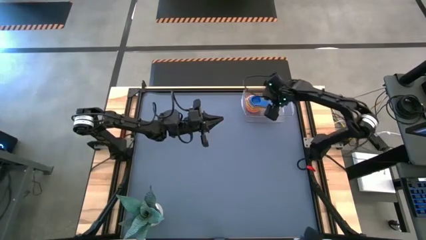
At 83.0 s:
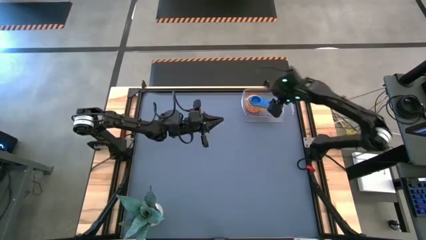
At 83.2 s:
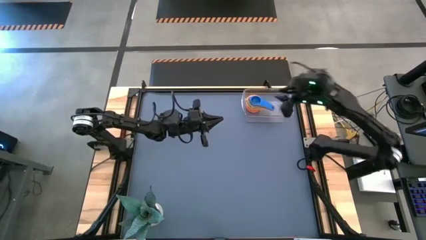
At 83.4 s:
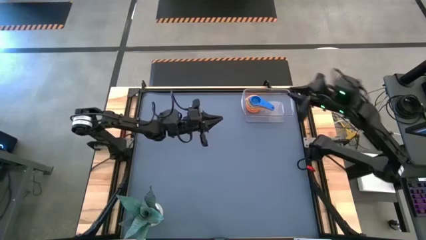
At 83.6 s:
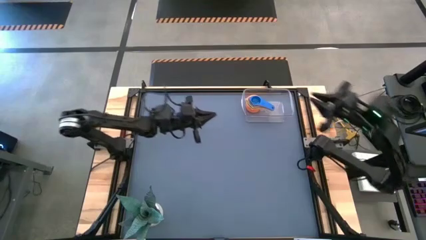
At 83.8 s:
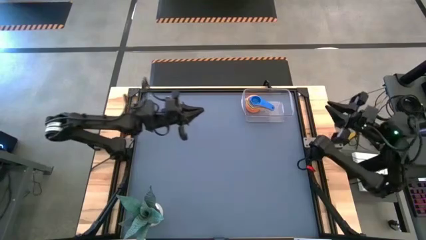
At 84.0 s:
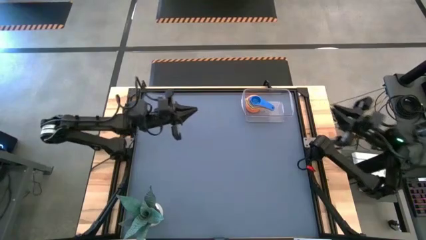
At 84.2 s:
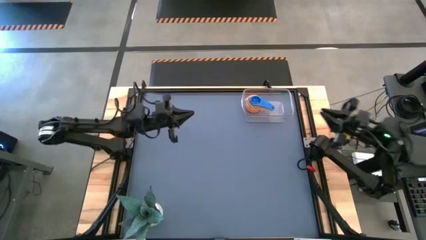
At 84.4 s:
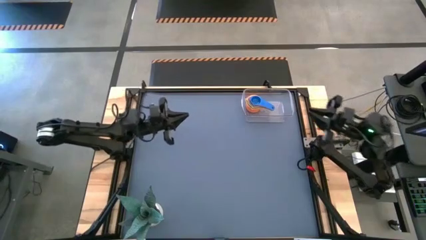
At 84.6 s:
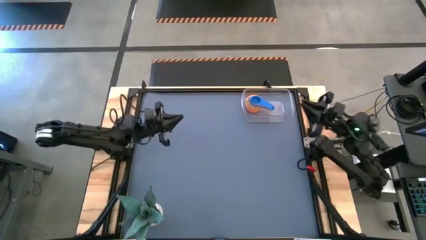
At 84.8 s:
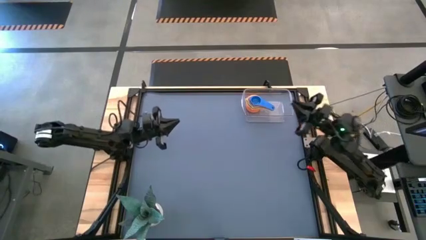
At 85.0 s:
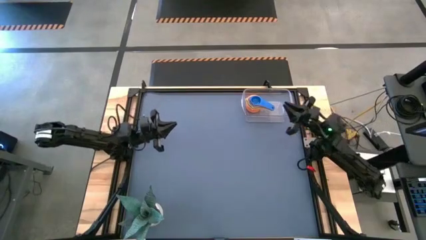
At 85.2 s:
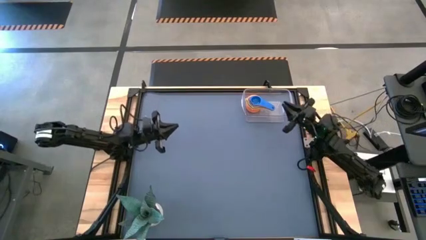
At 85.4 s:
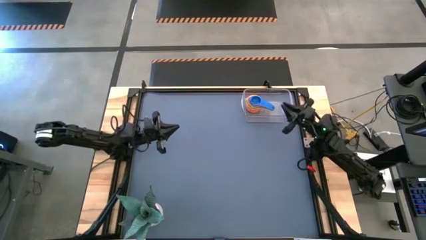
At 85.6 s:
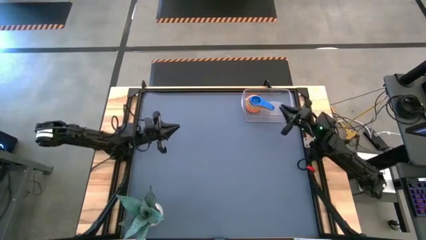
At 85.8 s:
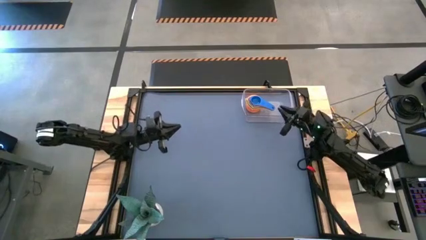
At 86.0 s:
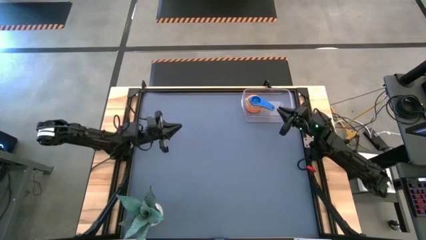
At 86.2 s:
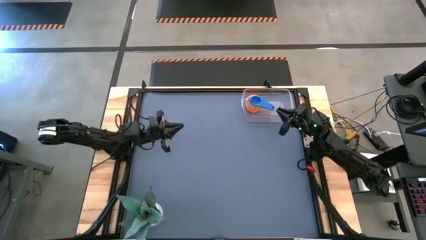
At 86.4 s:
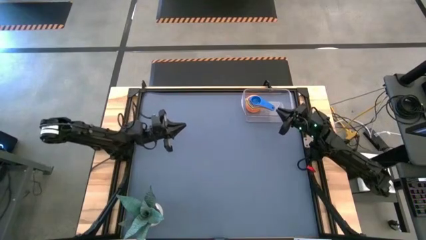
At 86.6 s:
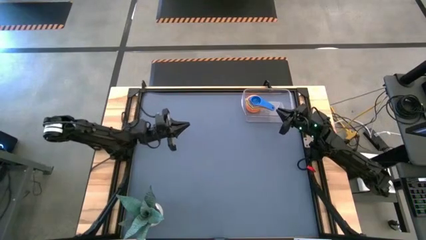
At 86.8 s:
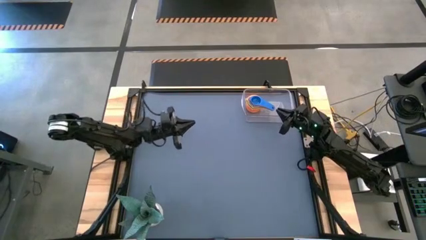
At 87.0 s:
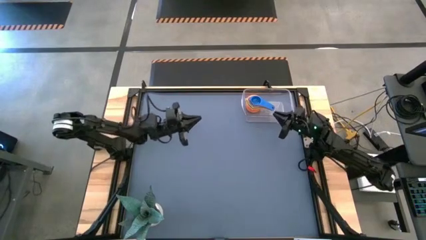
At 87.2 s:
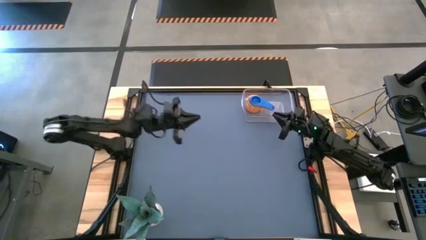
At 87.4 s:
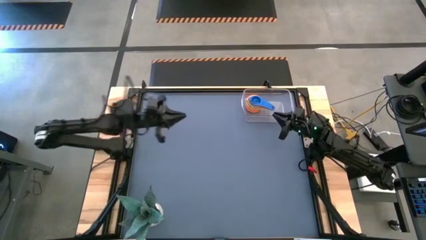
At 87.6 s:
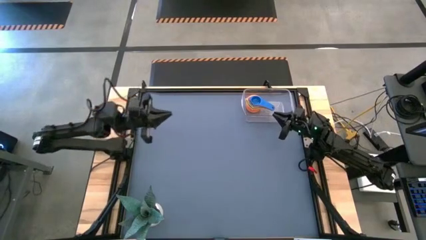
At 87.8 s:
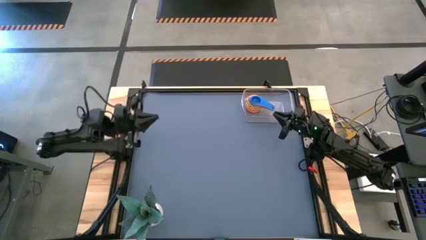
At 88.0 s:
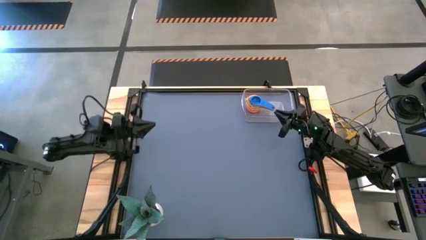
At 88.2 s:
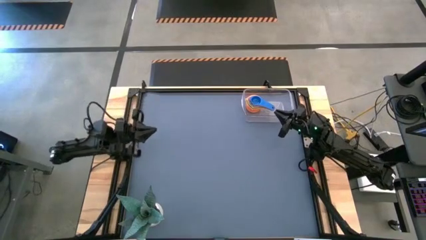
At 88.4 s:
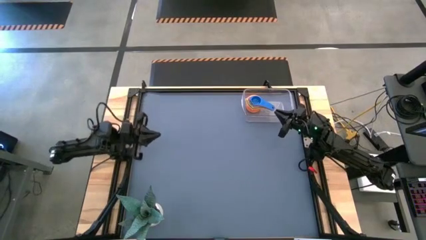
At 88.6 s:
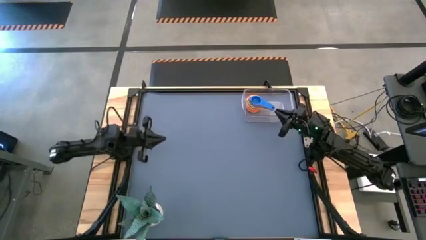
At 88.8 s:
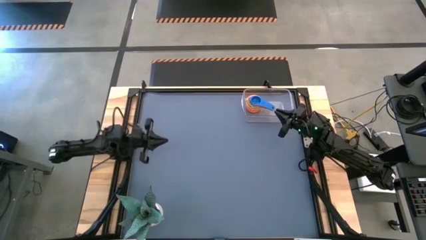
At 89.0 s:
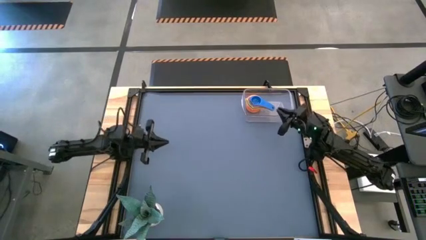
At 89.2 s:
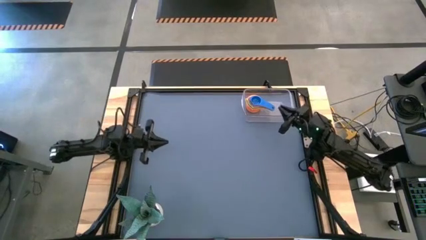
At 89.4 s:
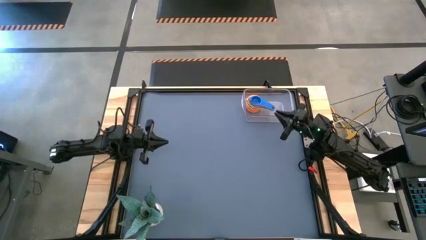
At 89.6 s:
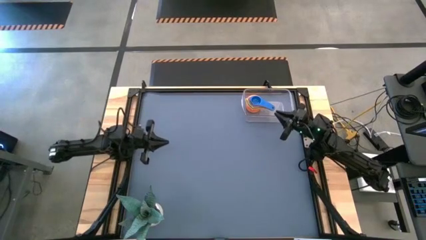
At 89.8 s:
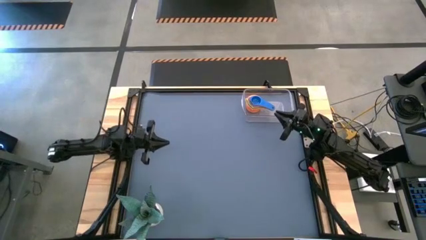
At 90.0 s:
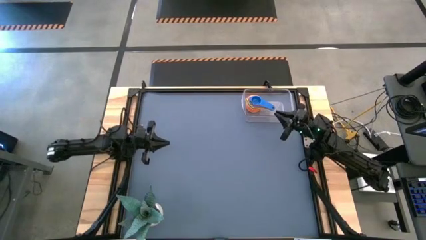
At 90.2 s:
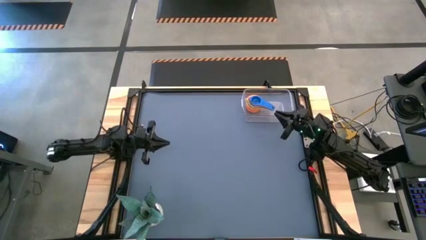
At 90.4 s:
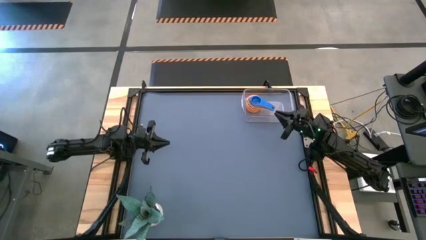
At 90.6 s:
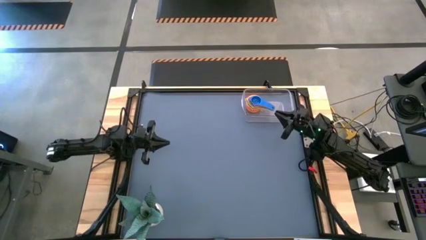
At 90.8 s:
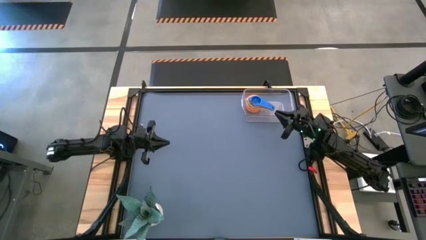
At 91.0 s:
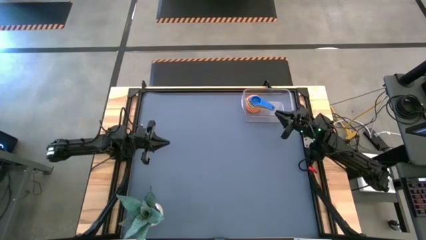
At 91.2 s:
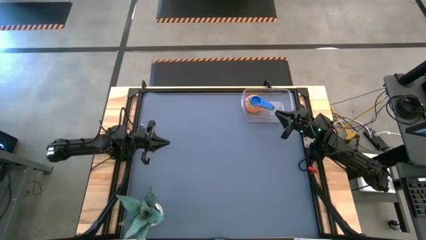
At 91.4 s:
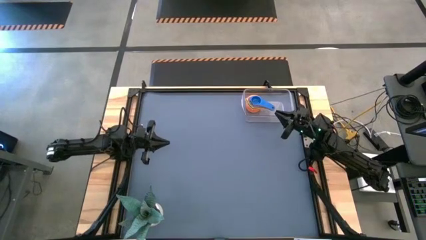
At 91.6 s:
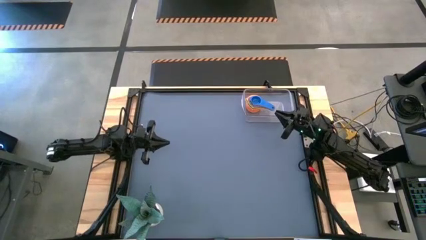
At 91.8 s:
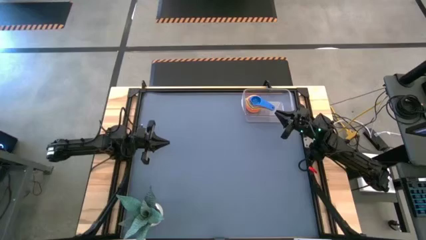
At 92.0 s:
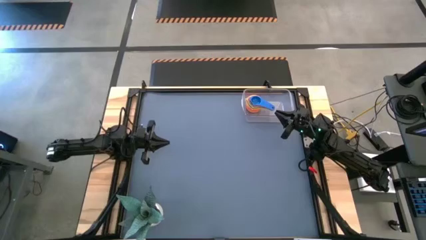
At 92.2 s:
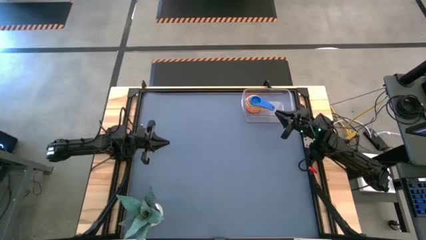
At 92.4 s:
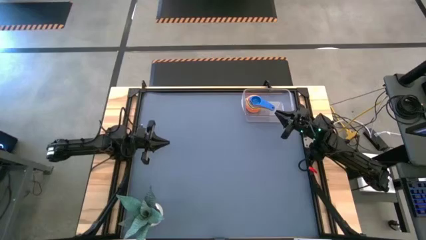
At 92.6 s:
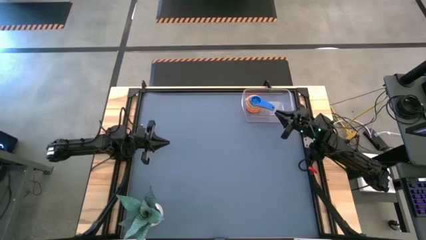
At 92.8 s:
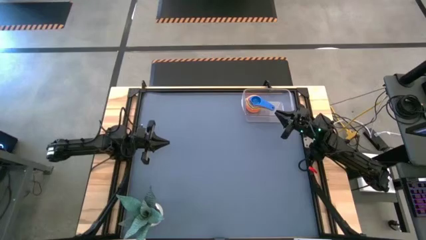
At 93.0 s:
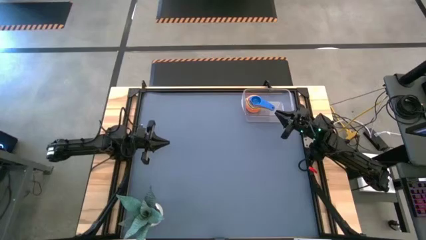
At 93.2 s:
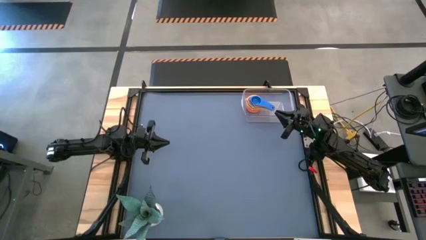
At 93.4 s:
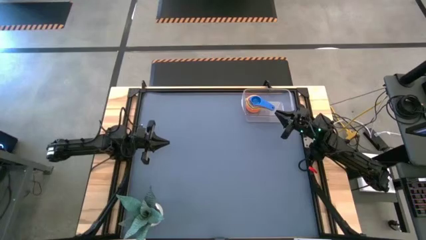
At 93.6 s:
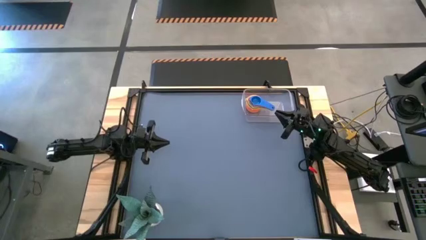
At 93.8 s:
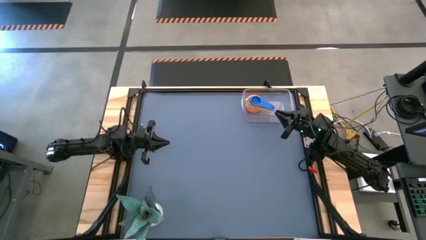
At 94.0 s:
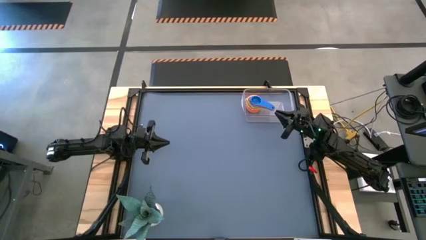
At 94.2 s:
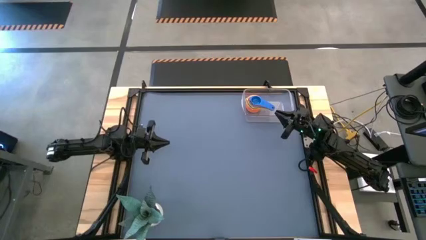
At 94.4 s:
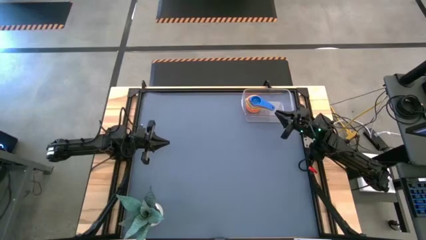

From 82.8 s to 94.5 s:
Task: Nest measuring cups in basket
Return to Home Position

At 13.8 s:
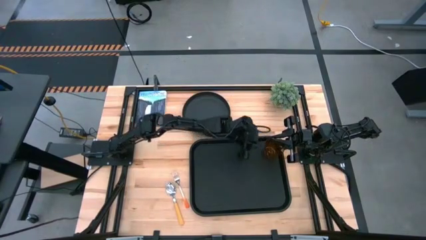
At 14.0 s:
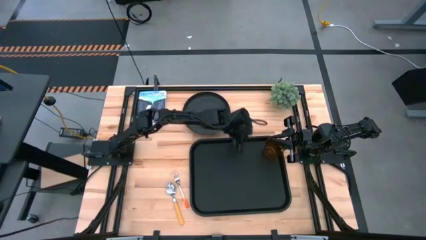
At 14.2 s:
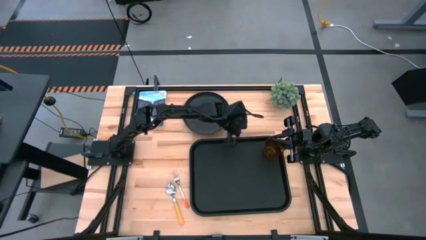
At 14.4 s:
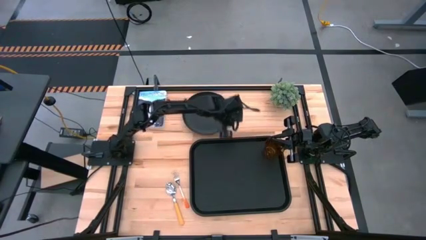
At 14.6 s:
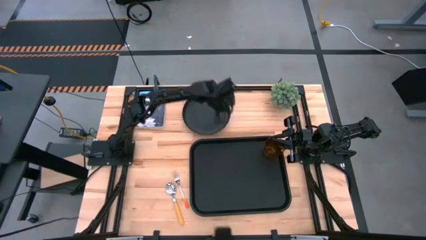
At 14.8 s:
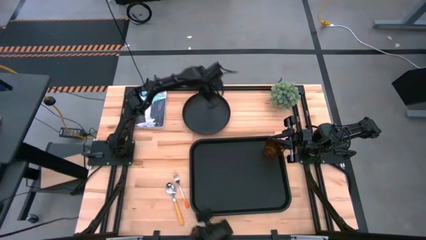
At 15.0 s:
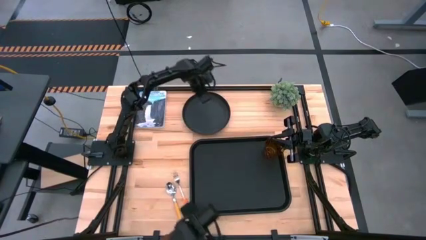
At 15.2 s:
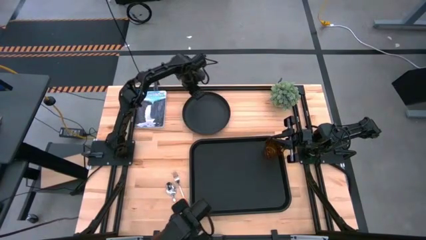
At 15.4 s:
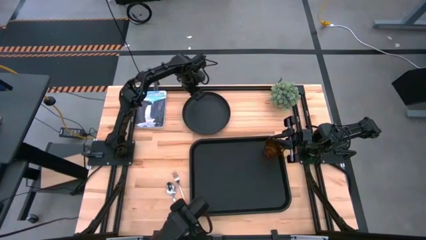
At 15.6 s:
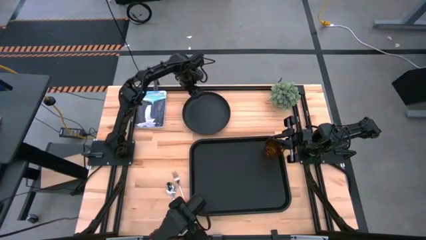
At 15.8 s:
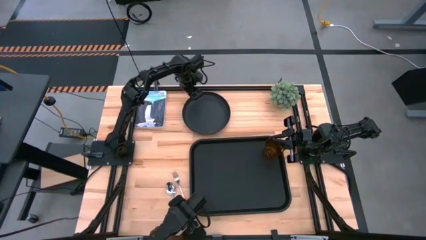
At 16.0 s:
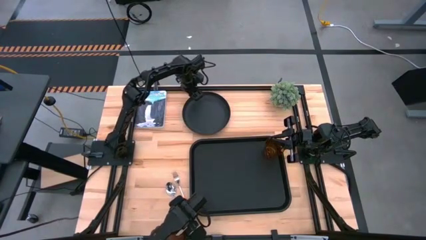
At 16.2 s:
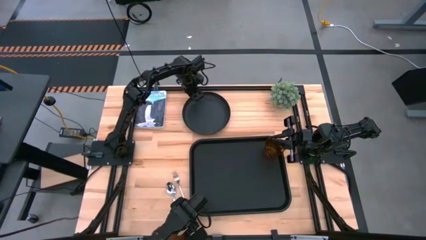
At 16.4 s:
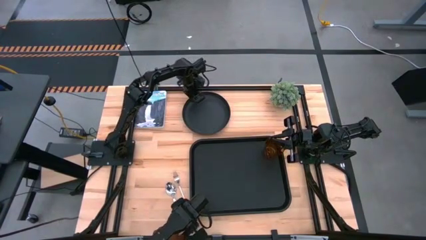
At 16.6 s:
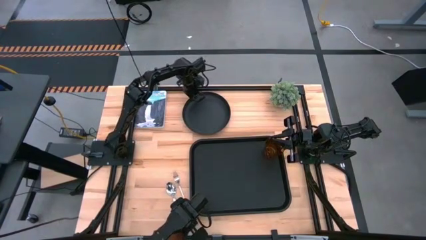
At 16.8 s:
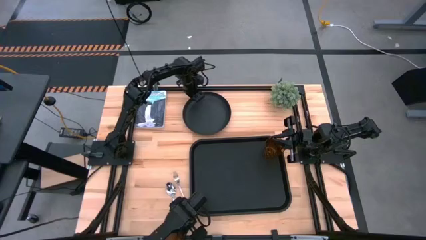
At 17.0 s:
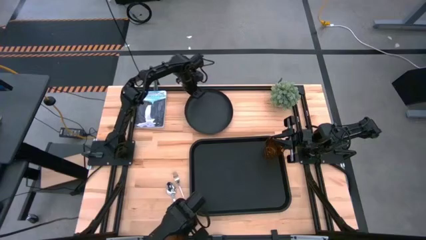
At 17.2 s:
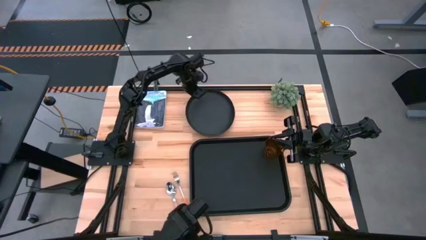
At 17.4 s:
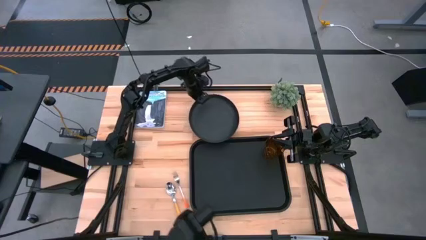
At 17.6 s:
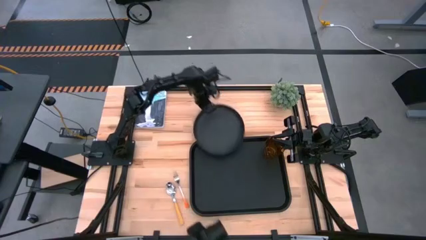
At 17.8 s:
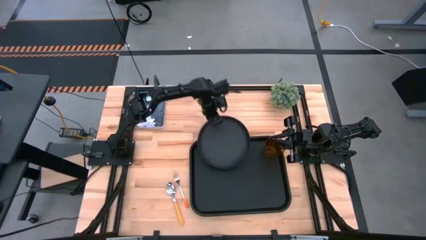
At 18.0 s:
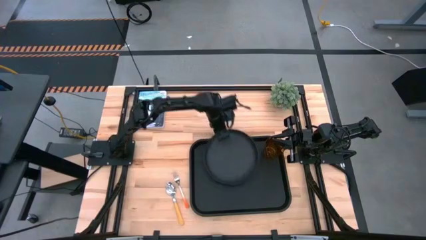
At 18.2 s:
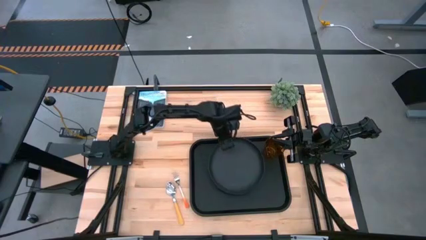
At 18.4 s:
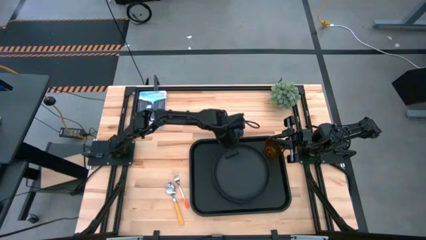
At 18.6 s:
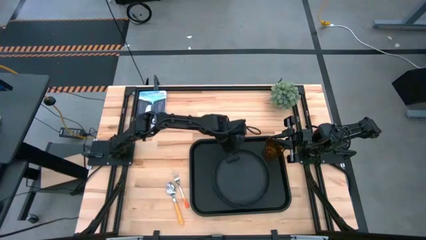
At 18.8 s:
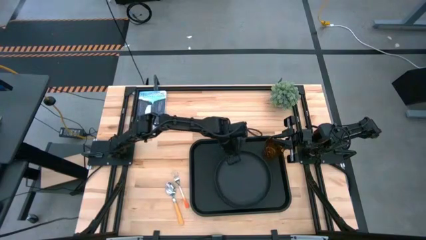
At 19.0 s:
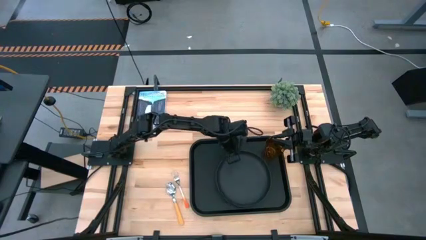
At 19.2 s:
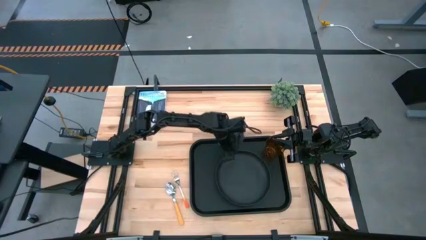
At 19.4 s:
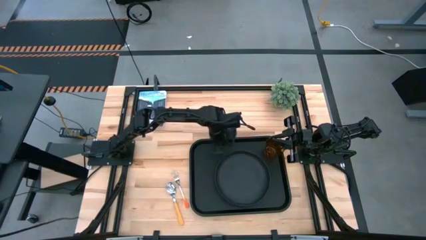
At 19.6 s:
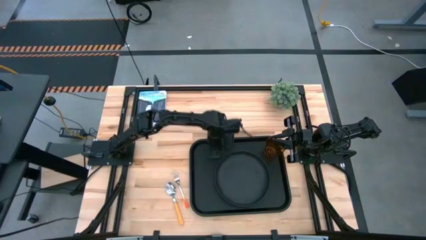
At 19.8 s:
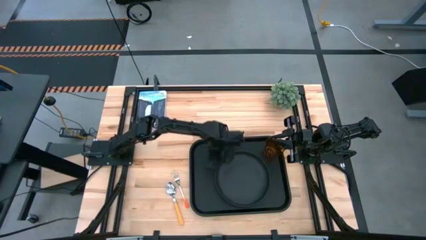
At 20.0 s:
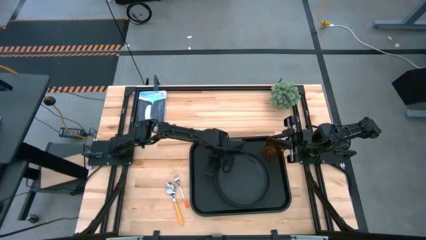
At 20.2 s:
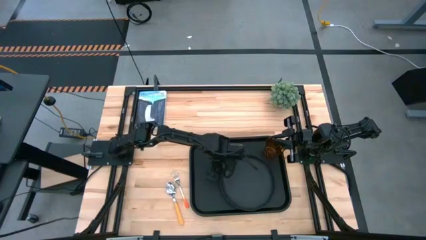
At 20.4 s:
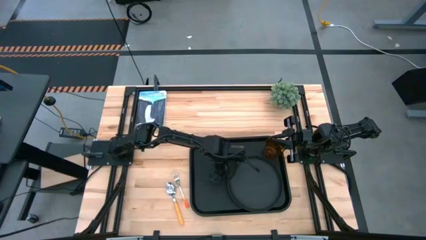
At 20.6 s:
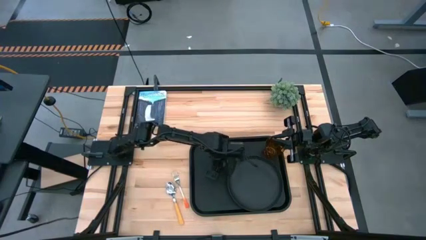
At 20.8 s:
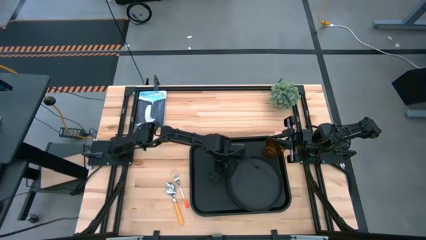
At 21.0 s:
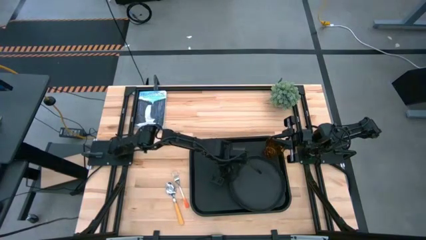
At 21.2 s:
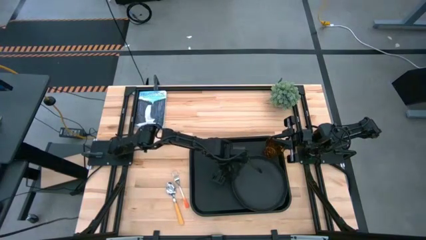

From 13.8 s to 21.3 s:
Task: Pick and place plate/cup/fork/spoon on tray
Put the black plate on the black tray to the bottom of the orange cup
